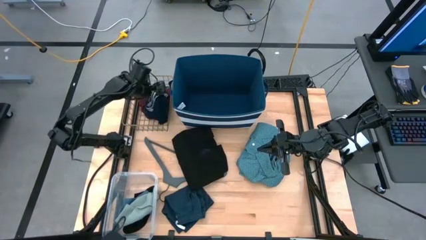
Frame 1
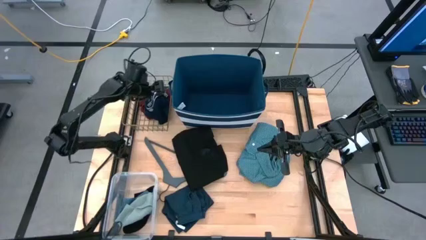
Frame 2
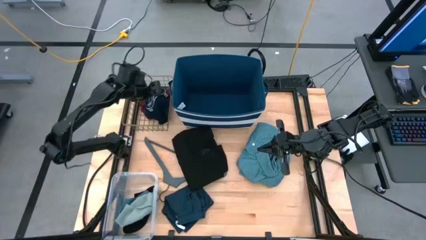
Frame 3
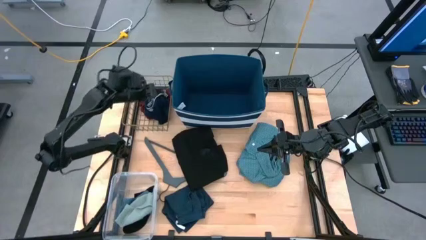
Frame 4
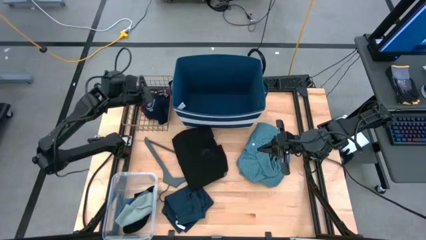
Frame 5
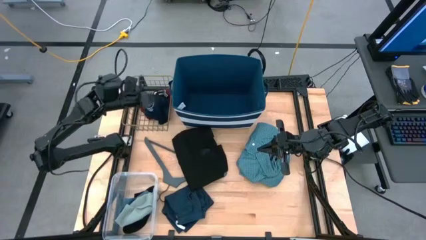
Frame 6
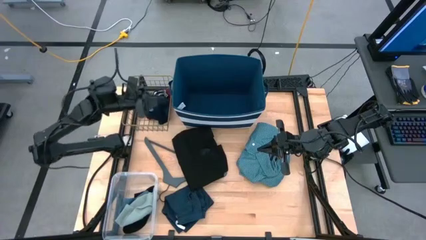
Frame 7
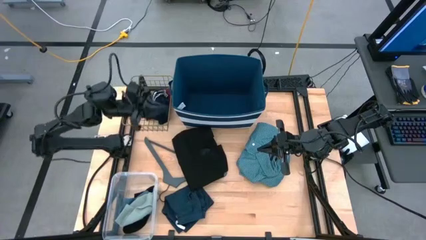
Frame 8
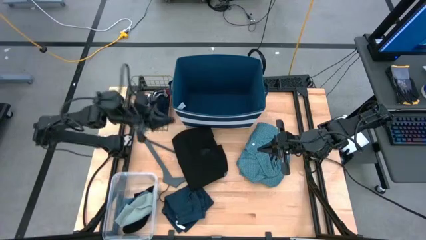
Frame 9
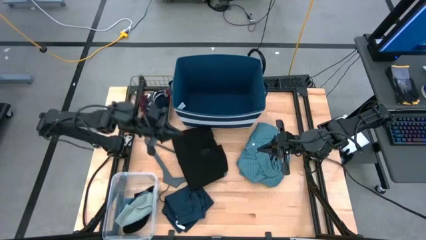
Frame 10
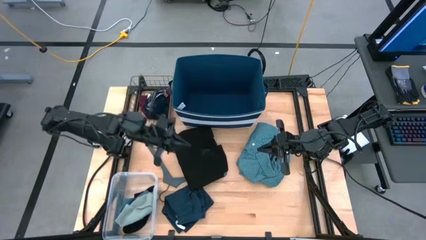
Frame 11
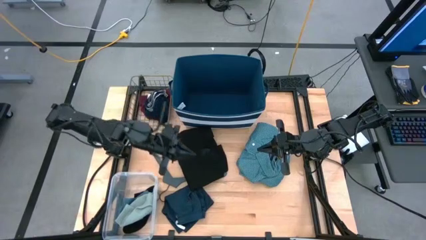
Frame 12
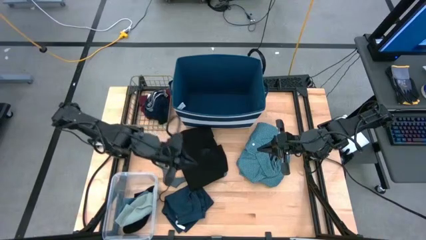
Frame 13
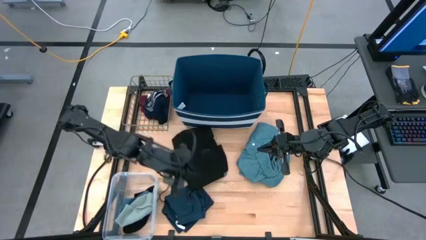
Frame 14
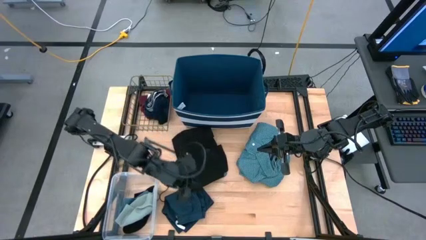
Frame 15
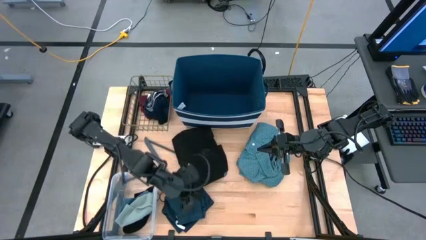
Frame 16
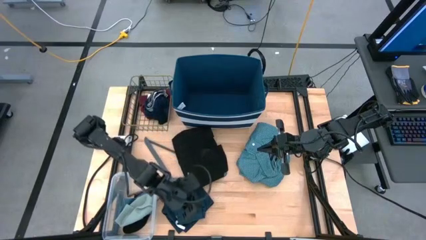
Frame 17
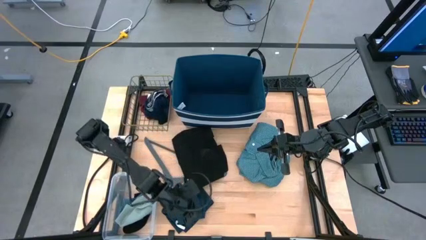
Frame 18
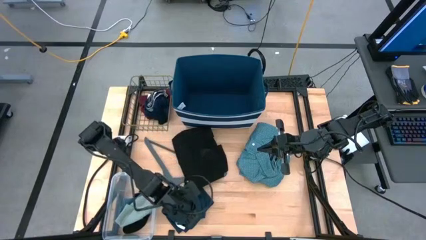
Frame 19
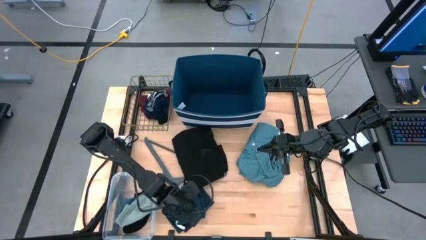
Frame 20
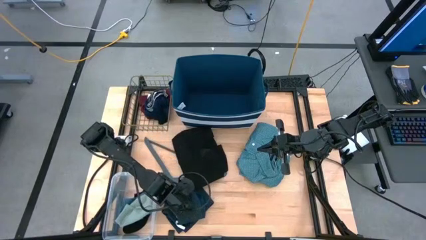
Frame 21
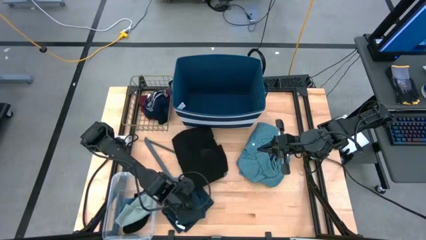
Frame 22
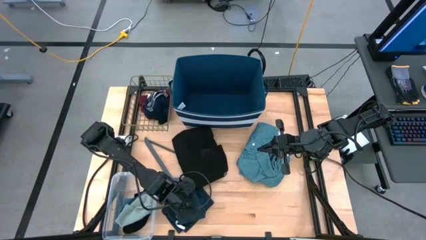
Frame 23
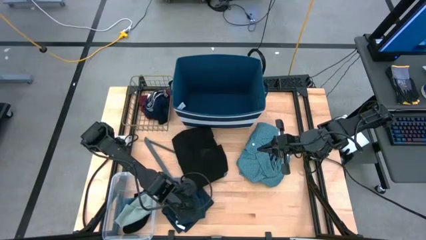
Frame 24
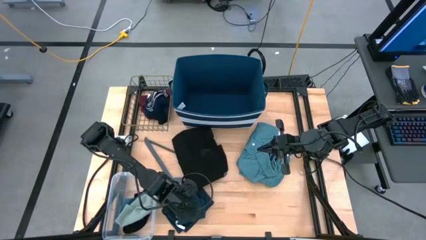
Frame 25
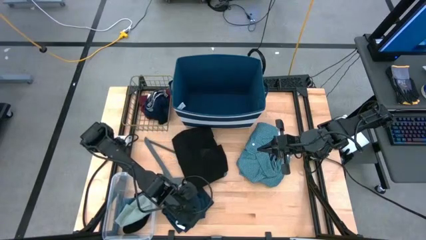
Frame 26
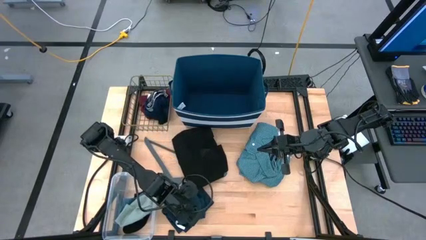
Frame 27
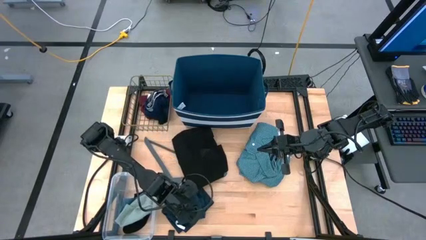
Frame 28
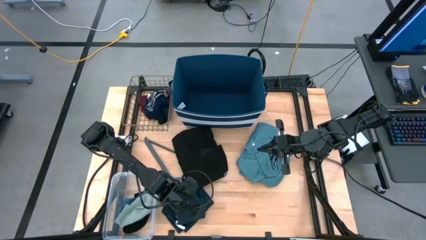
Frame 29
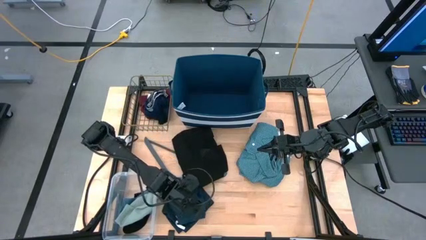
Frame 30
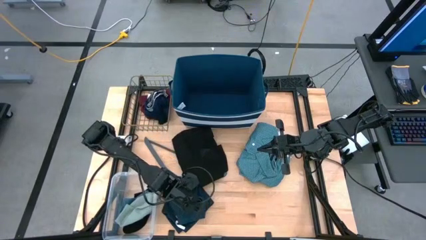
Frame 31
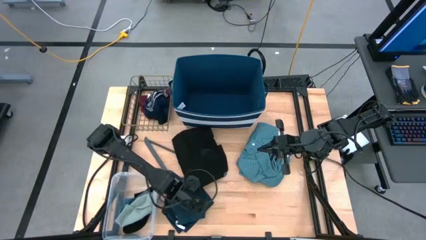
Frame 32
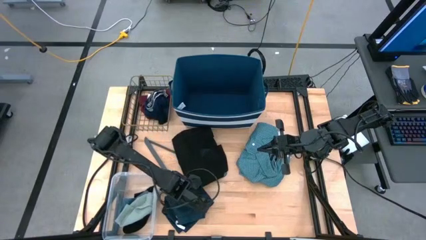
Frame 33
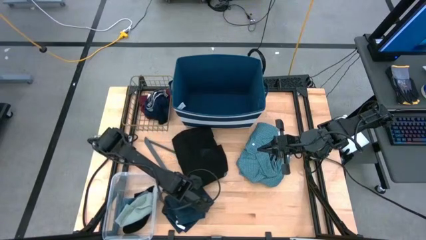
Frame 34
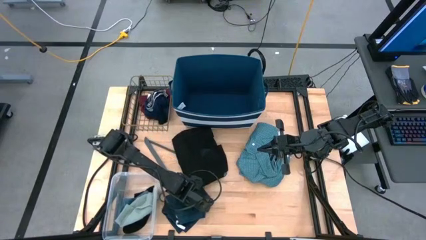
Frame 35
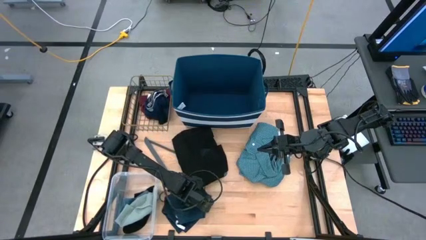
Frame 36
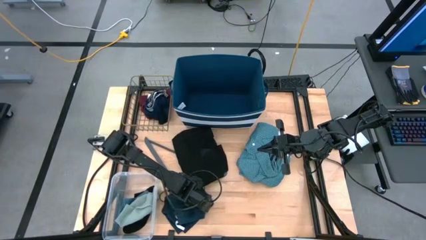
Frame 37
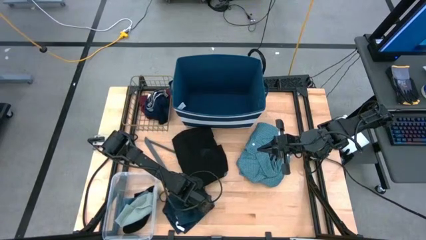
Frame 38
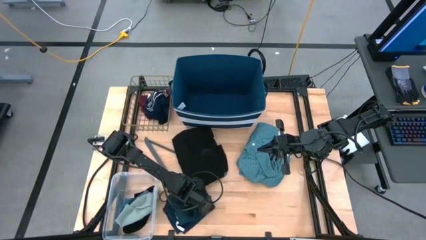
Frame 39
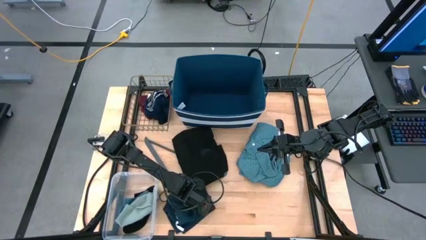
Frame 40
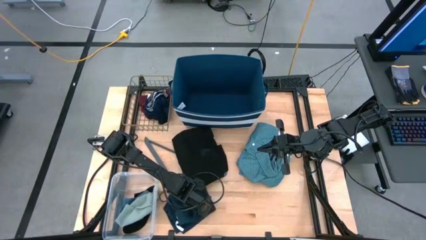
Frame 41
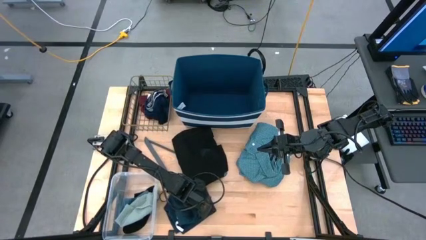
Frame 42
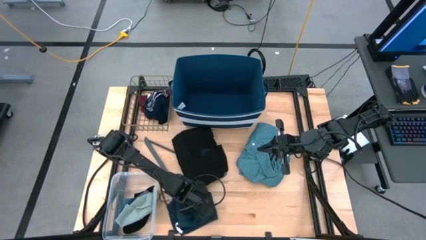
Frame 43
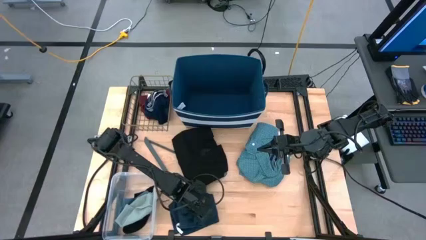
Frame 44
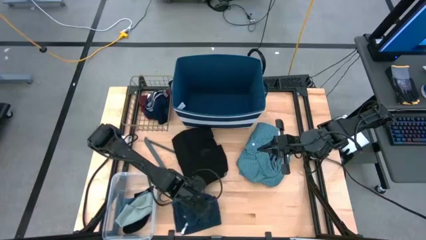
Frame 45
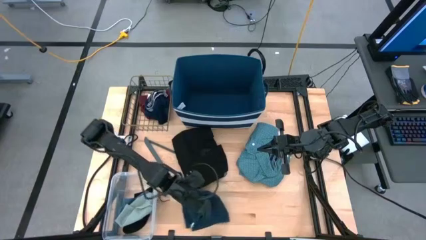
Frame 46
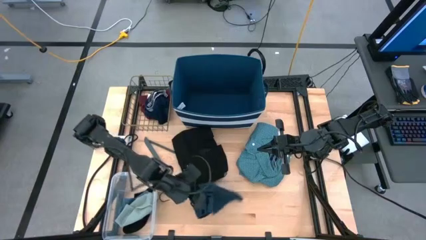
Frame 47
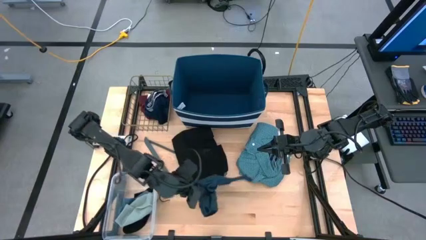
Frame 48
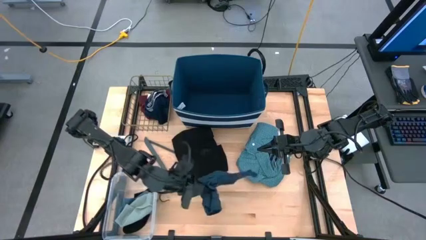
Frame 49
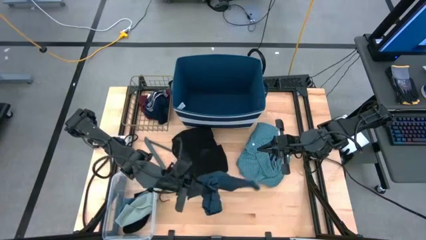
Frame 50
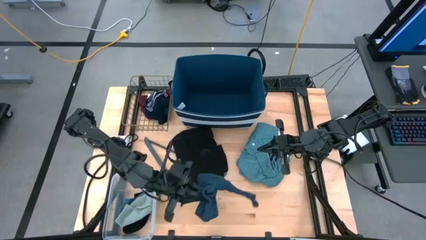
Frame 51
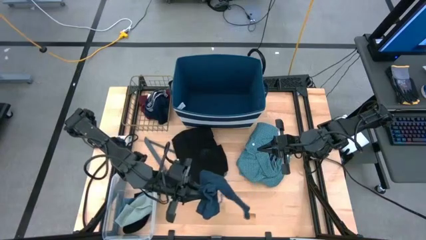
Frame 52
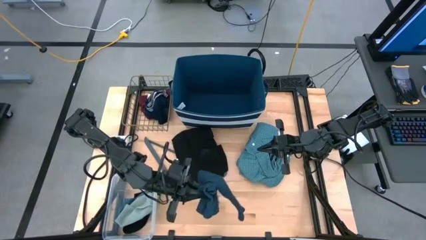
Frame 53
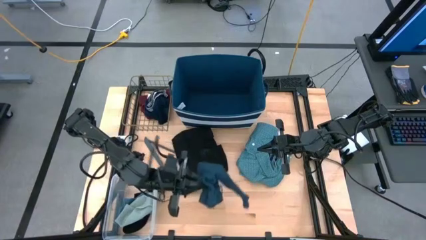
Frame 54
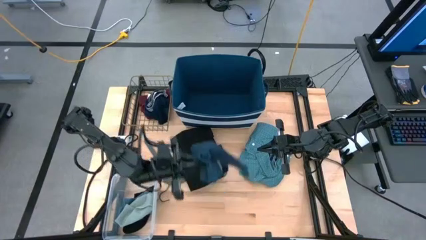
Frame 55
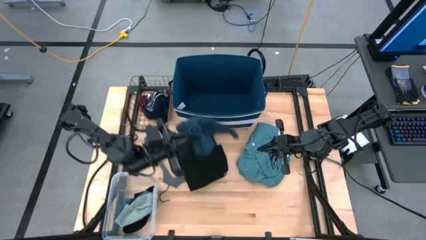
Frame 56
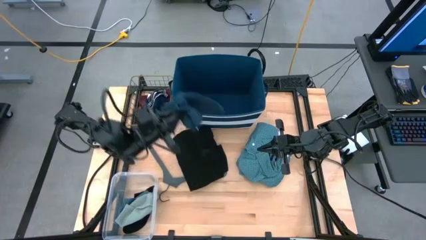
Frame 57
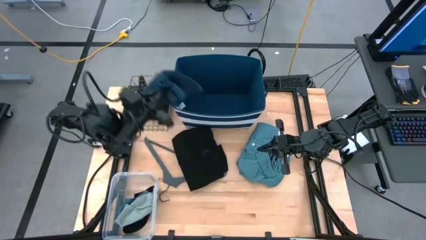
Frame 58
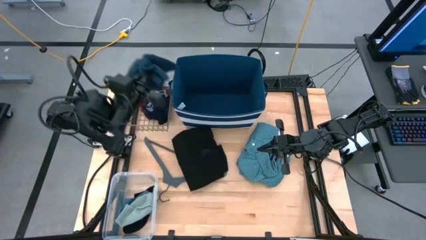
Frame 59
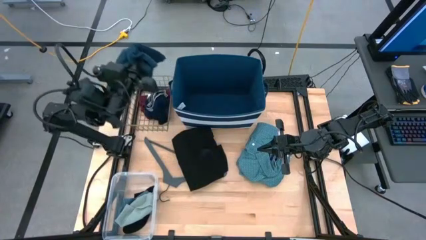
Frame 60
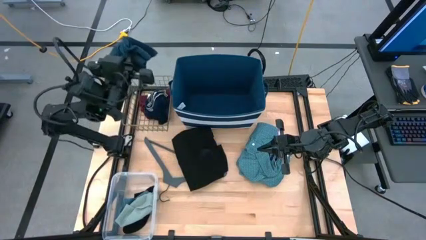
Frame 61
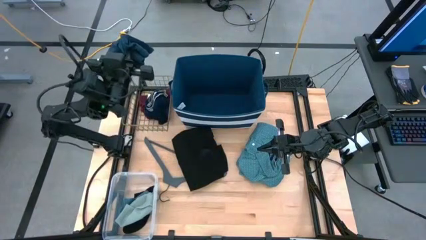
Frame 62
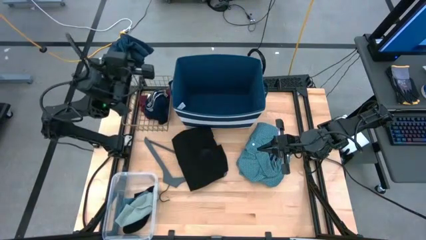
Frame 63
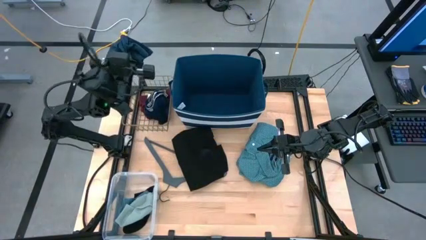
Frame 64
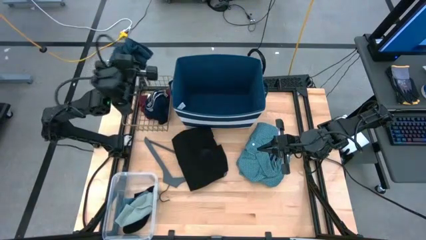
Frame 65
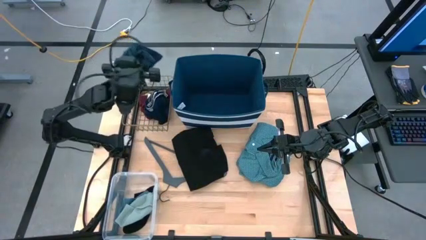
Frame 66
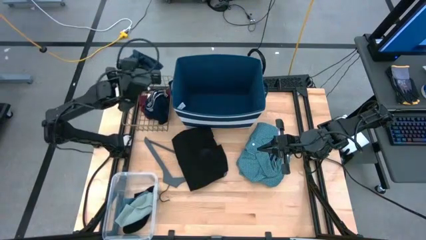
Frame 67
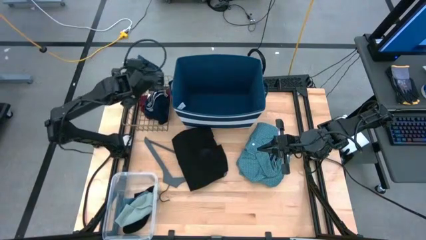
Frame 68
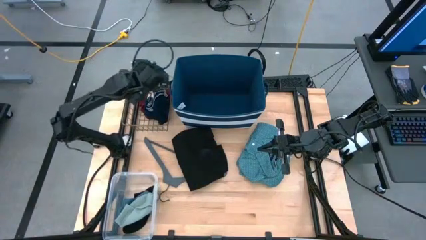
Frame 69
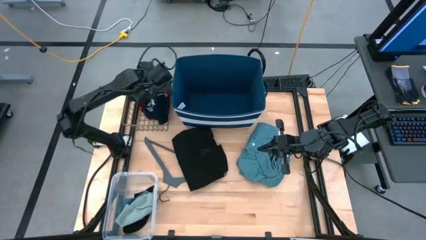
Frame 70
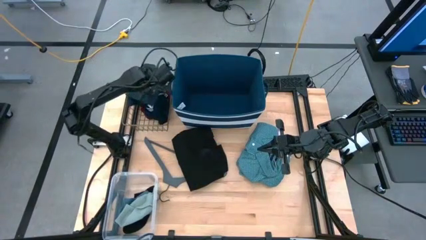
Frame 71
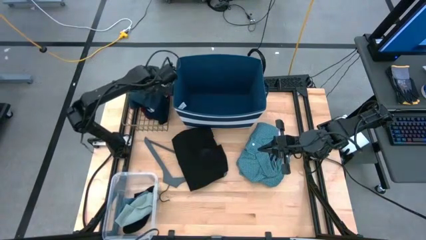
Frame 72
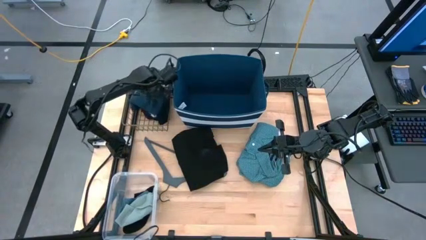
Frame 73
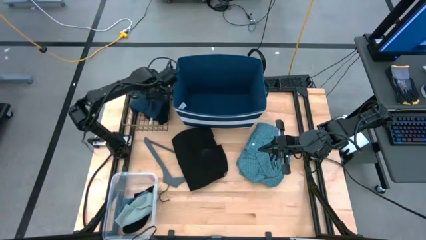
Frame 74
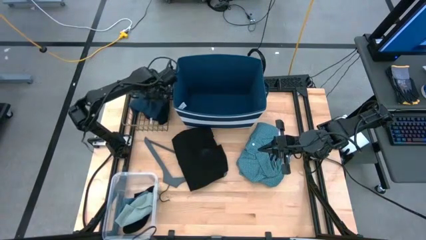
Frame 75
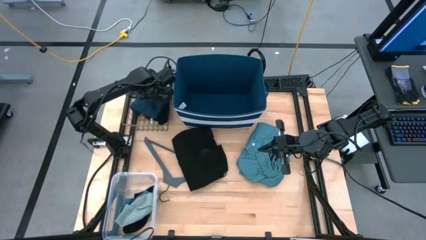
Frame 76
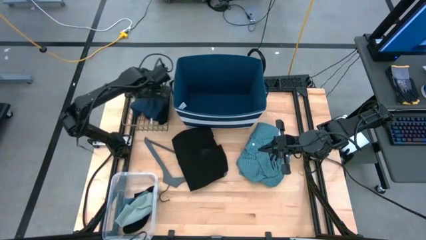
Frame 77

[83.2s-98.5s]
Task: Pick & Place Cloths
Put the gray pants into the gold wire basket
